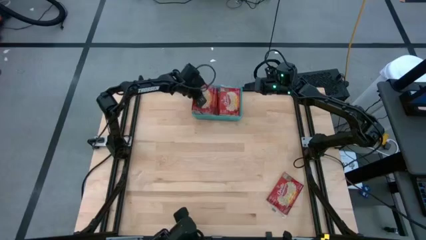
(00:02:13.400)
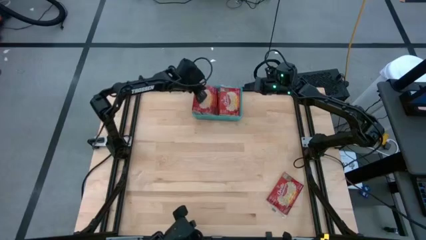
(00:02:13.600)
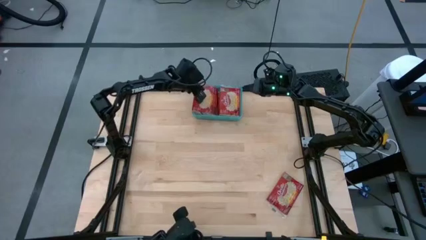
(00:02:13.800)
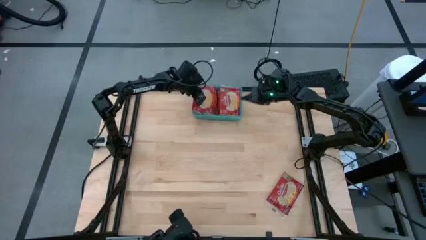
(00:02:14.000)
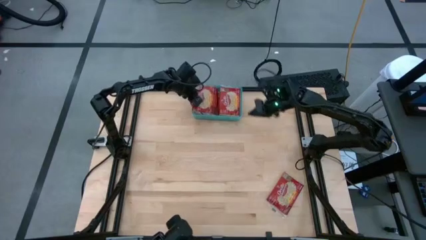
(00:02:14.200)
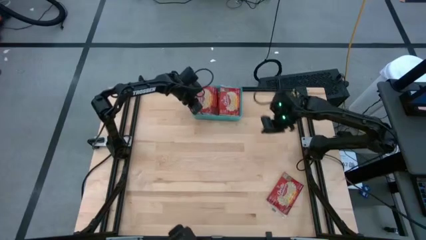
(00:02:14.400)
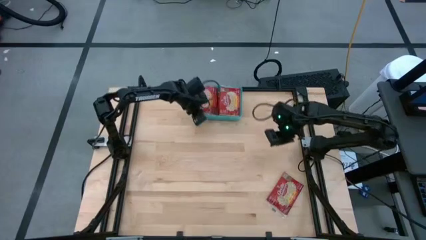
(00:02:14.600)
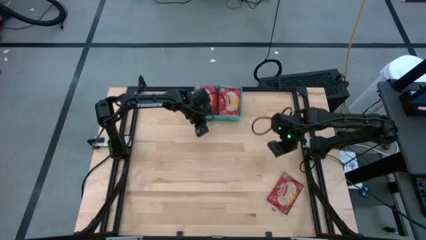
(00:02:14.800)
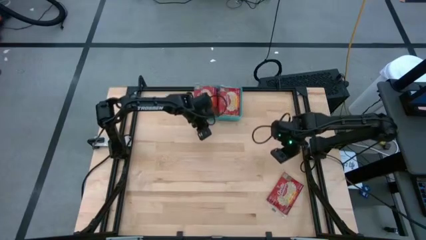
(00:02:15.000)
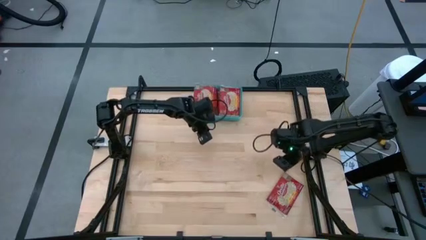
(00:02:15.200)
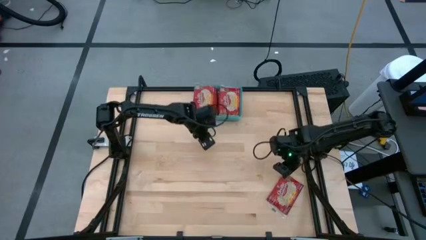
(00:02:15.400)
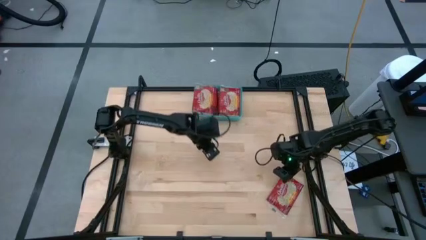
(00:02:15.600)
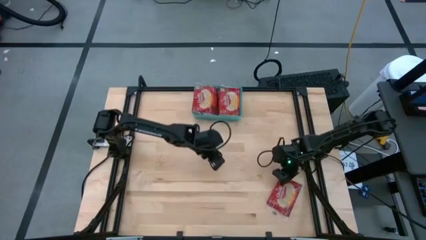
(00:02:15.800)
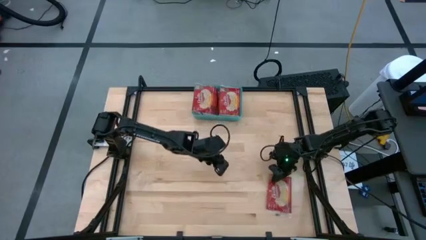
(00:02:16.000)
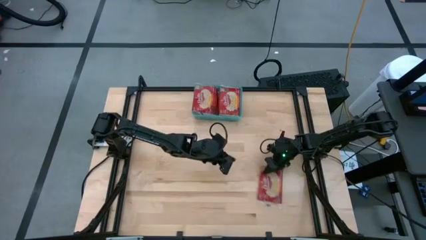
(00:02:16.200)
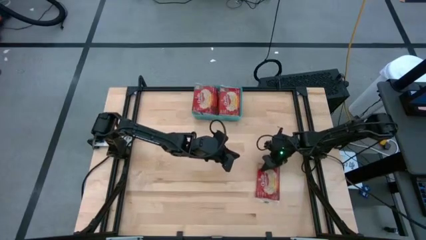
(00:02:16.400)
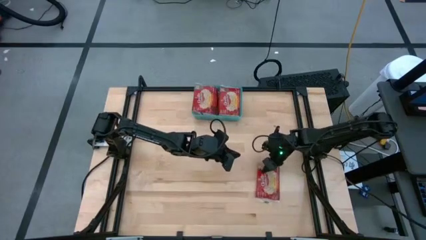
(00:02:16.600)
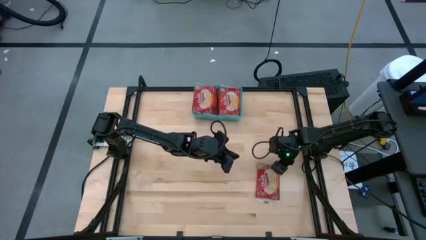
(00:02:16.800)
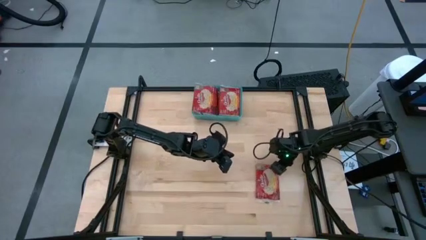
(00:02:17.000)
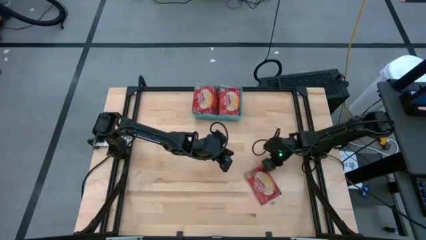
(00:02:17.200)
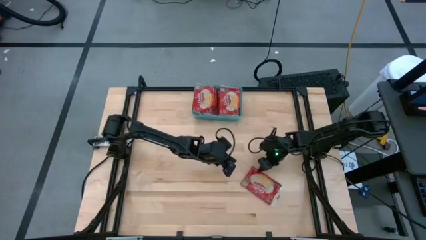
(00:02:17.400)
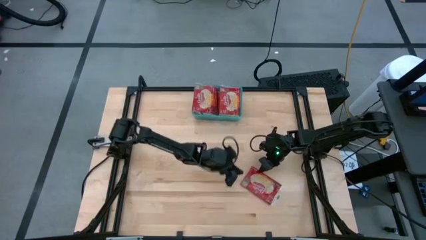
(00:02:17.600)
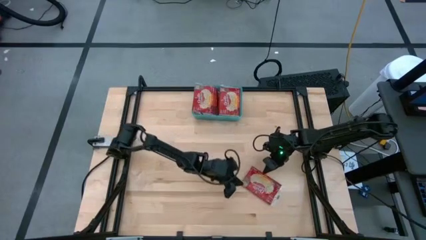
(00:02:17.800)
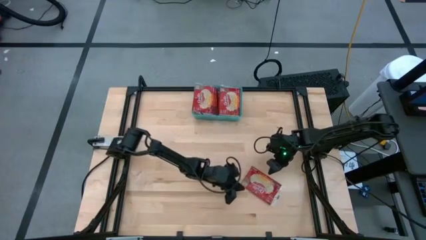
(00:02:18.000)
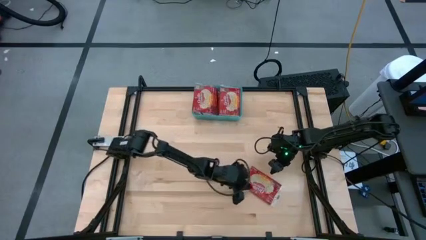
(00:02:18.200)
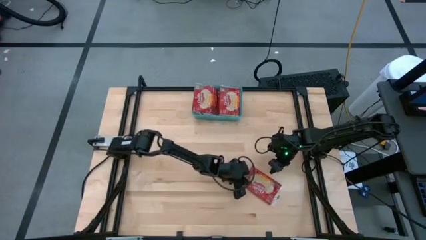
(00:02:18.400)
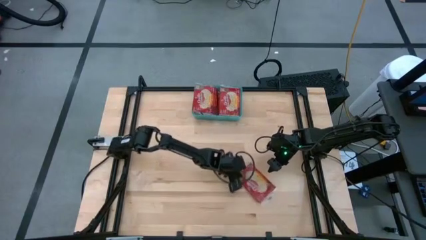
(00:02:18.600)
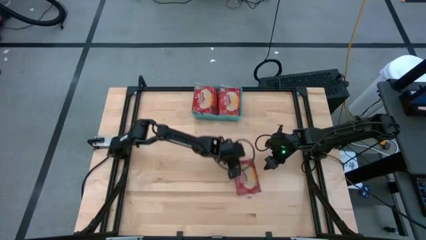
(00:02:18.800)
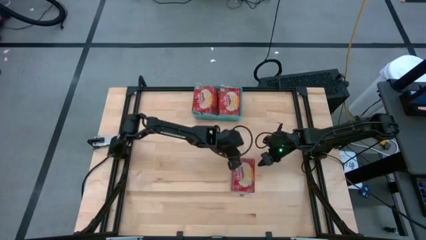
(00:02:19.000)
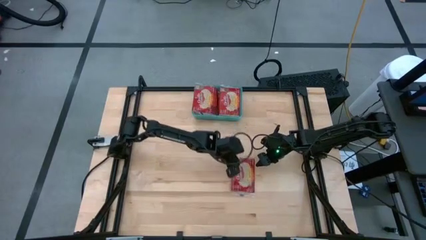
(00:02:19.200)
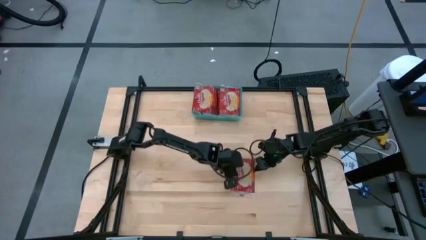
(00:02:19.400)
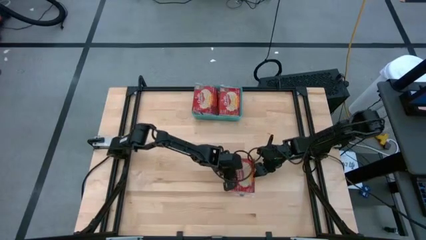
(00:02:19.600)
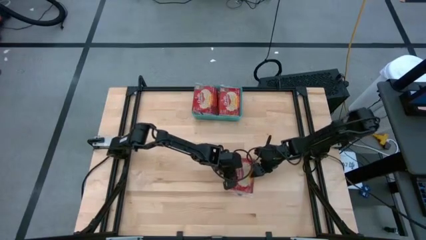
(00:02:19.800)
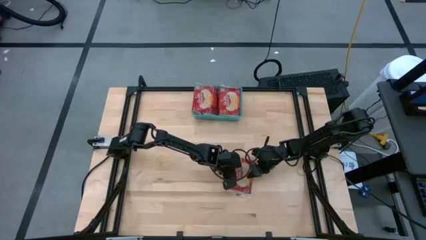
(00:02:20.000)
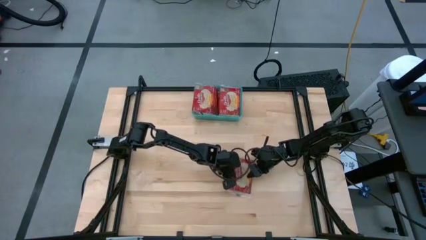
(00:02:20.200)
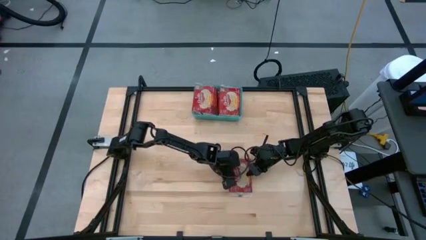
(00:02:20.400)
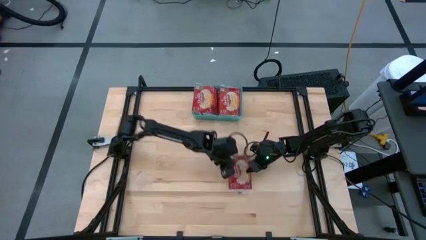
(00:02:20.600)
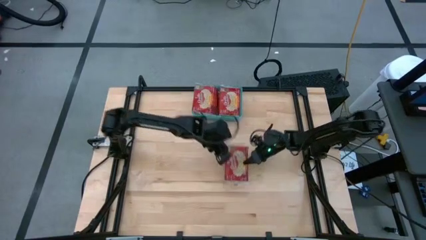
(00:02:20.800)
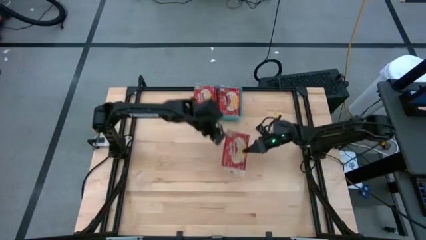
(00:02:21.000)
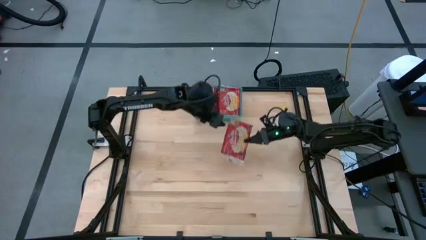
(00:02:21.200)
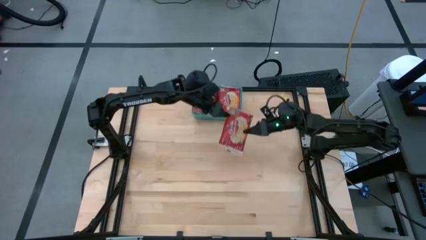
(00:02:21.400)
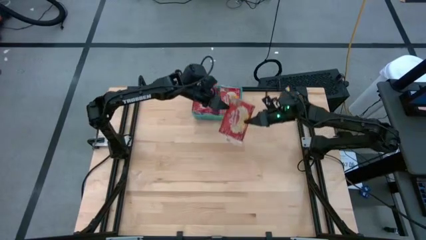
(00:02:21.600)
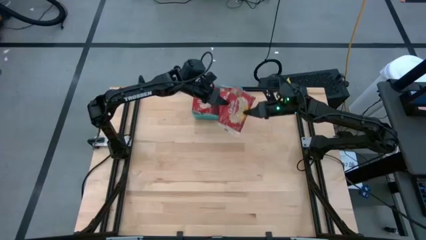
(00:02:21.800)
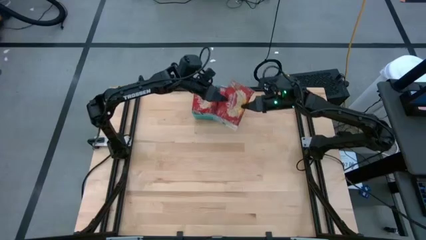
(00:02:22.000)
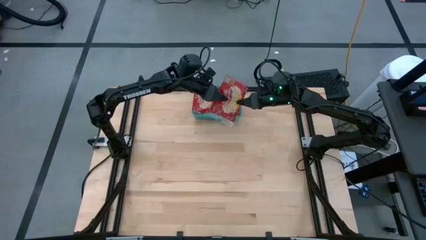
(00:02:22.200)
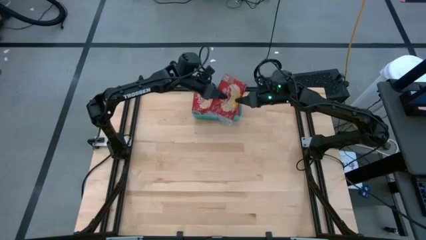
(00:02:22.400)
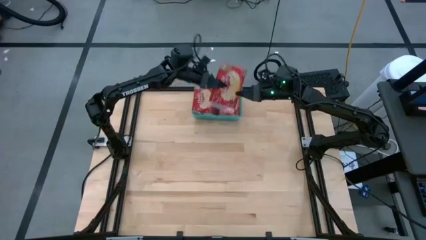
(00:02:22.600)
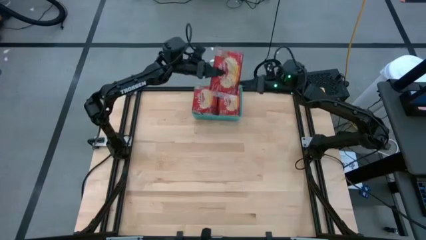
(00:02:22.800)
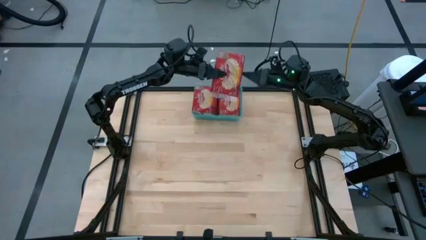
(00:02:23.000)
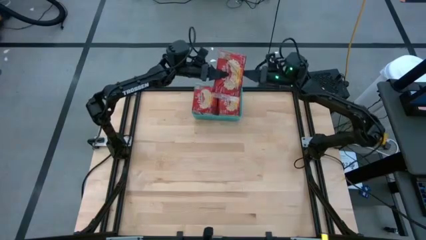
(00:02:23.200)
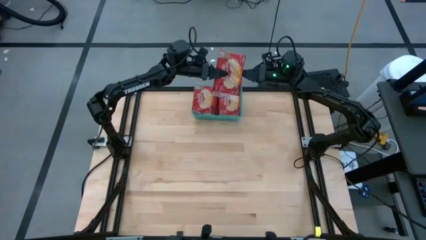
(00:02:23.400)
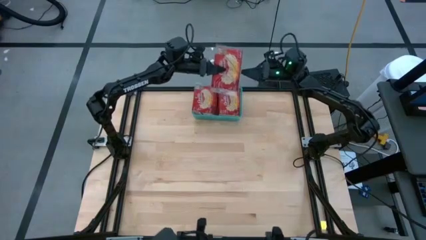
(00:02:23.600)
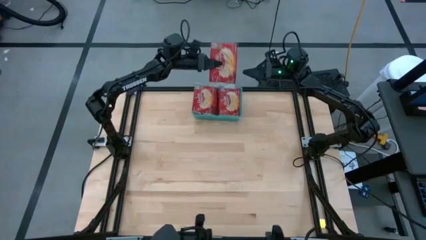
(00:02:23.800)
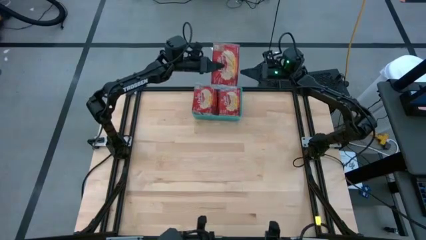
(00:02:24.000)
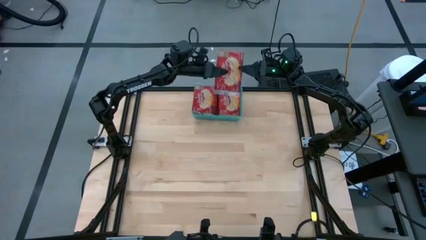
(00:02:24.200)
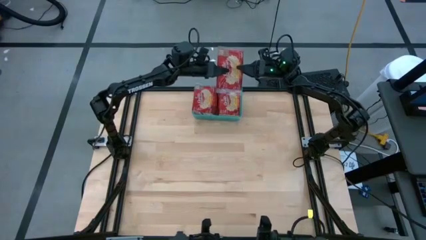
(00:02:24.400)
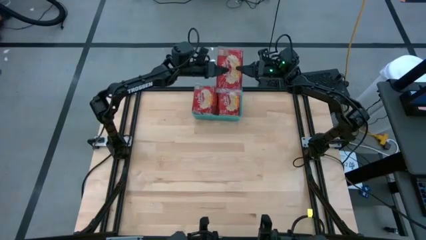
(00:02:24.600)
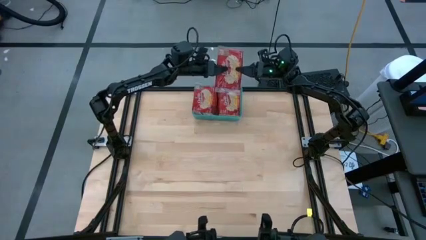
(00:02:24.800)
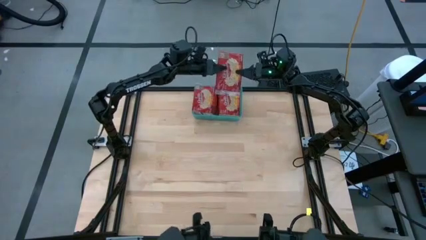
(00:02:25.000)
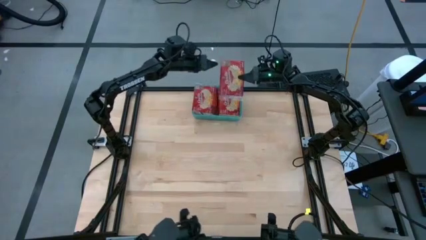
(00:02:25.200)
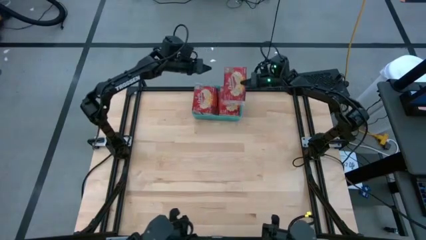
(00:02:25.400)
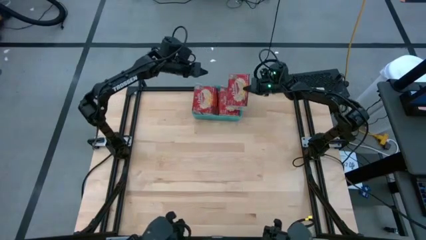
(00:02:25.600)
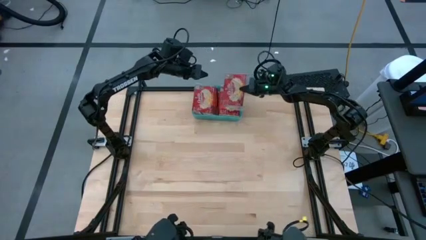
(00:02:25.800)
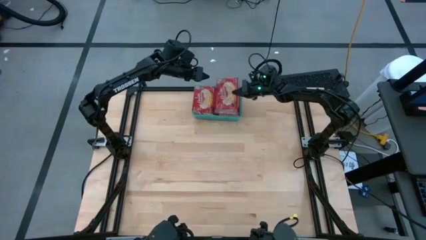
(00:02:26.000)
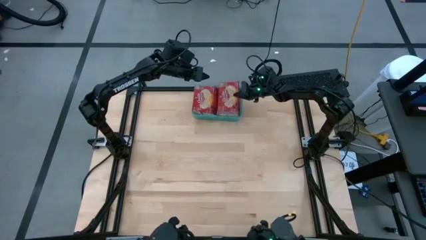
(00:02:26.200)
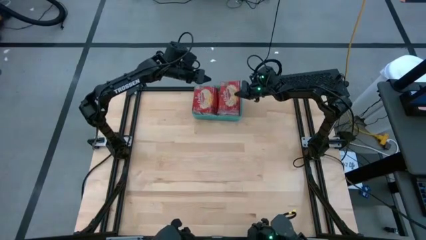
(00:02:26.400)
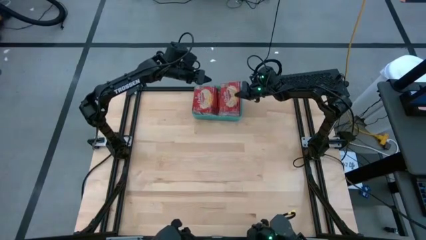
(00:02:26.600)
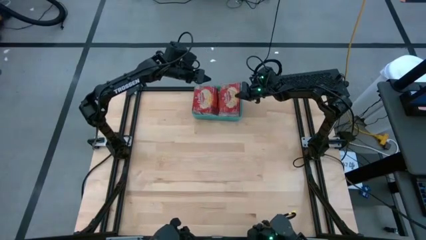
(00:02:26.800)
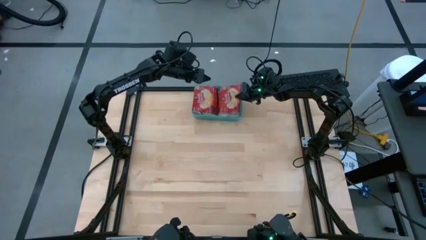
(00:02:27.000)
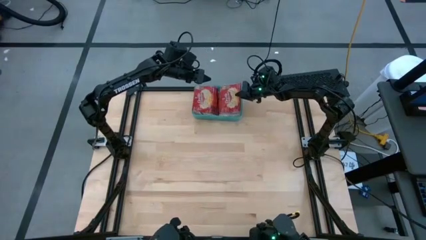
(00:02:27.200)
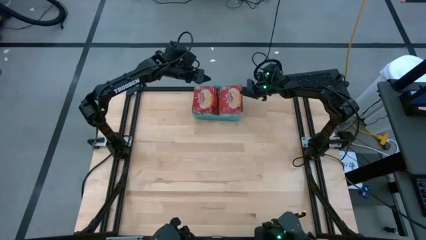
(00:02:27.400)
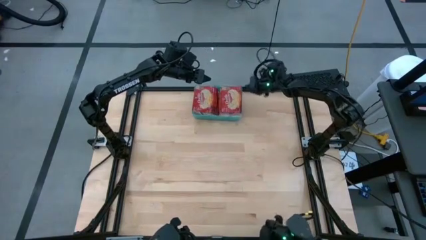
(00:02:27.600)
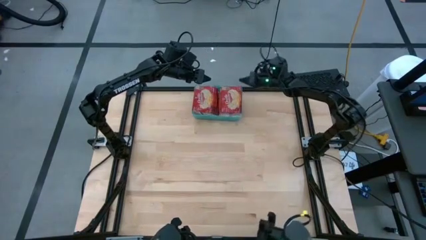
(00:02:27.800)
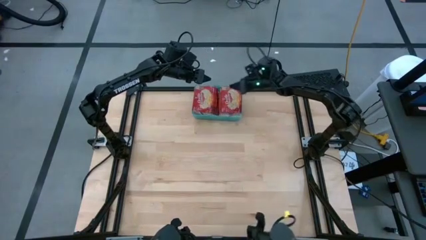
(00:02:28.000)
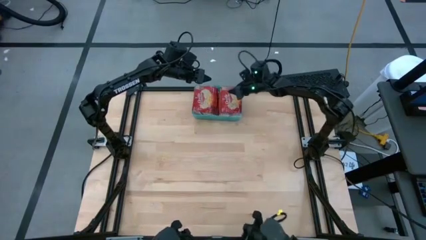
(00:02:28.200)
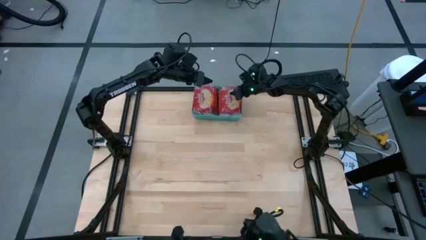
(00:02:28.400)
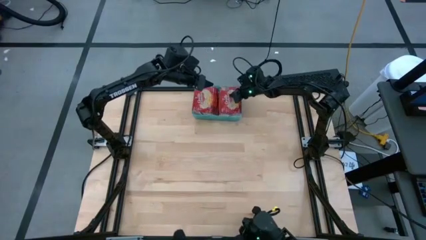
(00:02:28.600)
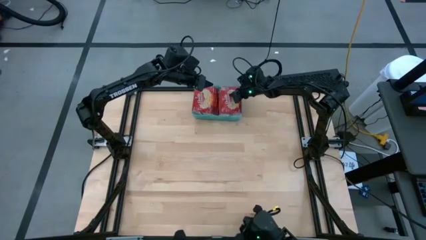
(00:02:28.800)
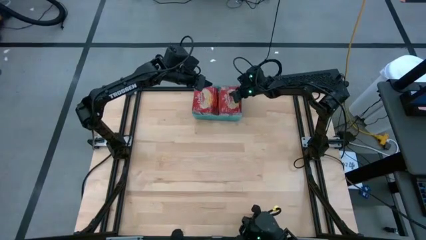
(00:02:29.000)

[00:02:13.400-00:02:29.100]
Task: Sort popcorn bags into baskets
Put the red popcorn bag into the blue bin
